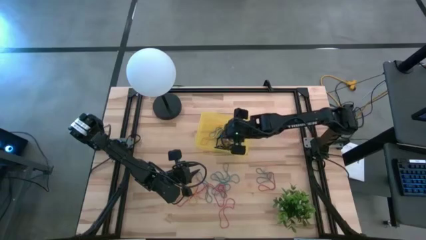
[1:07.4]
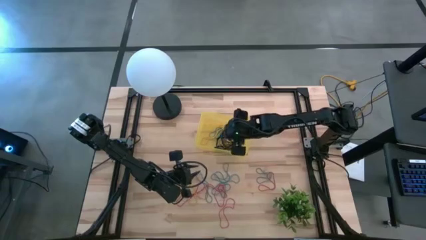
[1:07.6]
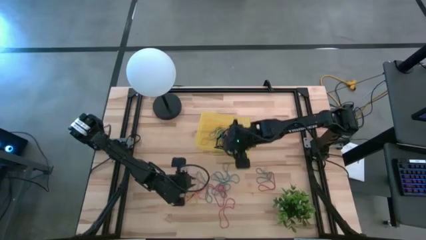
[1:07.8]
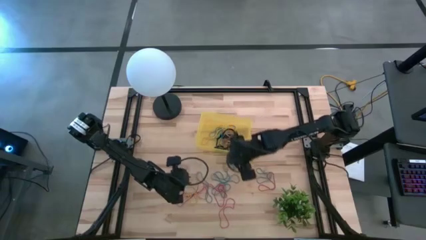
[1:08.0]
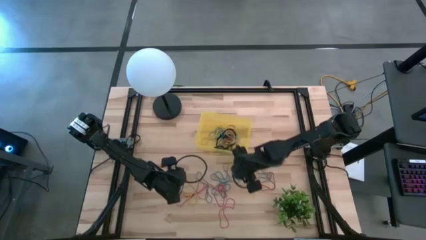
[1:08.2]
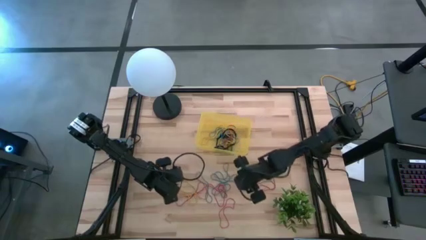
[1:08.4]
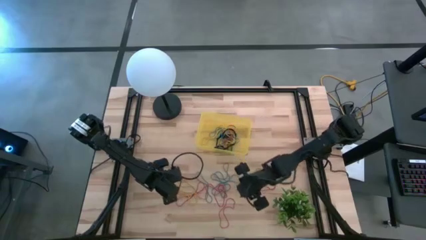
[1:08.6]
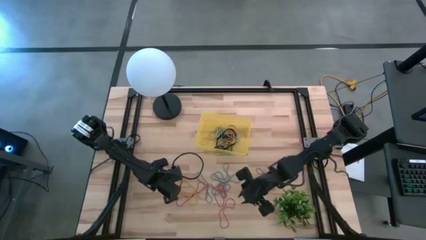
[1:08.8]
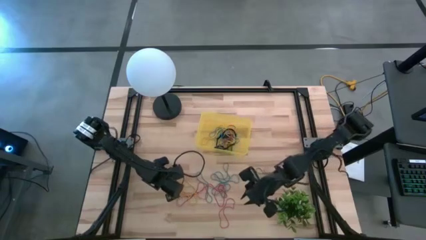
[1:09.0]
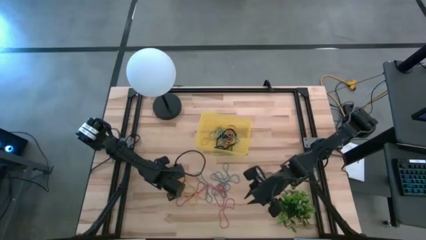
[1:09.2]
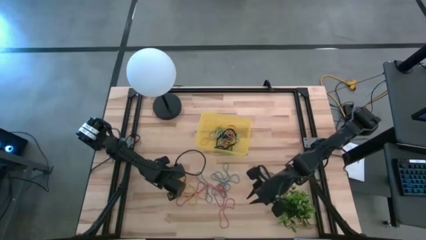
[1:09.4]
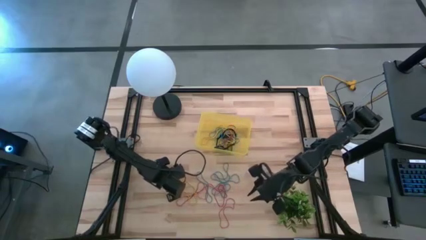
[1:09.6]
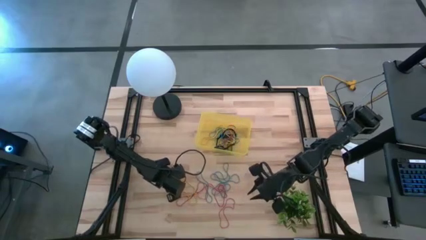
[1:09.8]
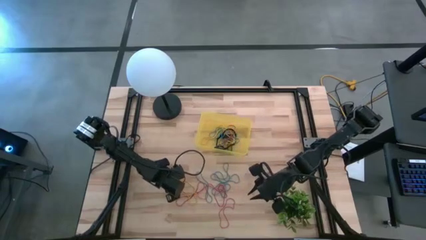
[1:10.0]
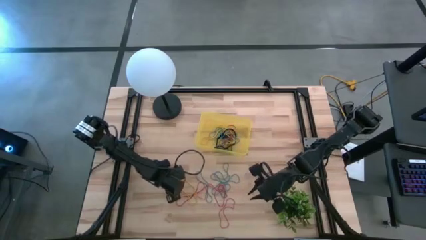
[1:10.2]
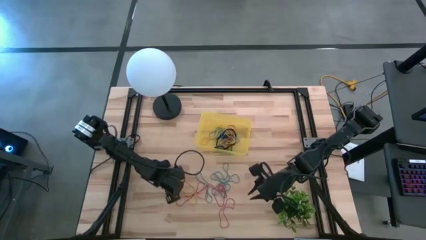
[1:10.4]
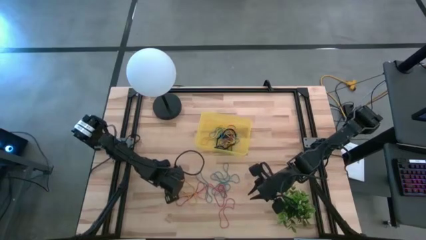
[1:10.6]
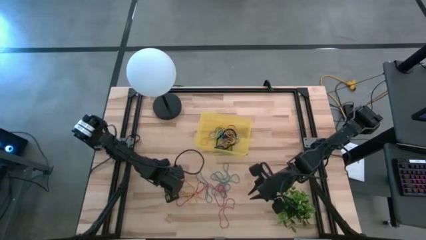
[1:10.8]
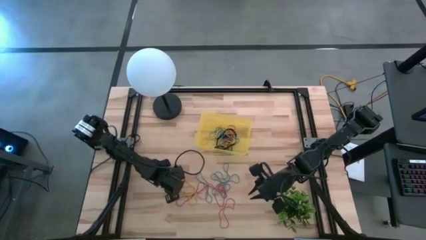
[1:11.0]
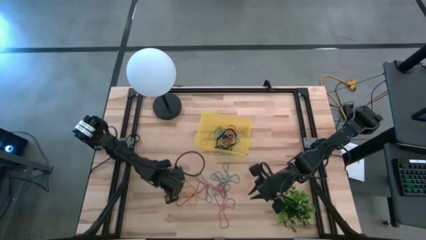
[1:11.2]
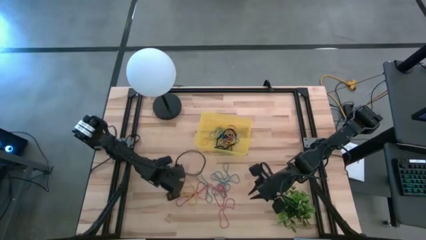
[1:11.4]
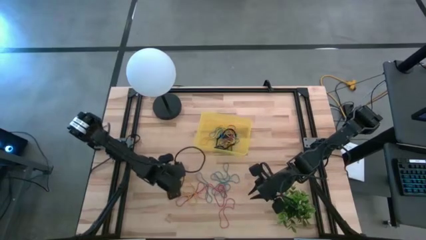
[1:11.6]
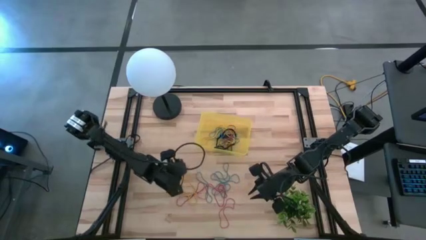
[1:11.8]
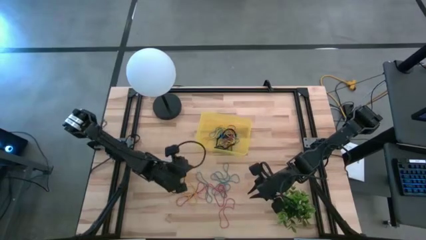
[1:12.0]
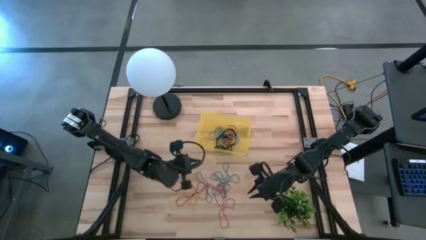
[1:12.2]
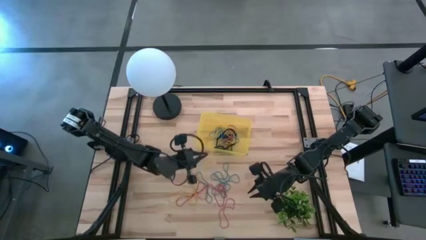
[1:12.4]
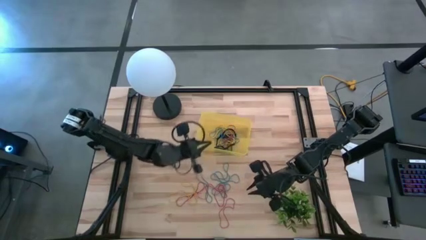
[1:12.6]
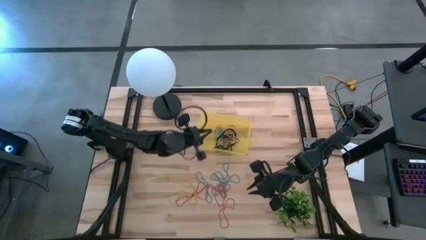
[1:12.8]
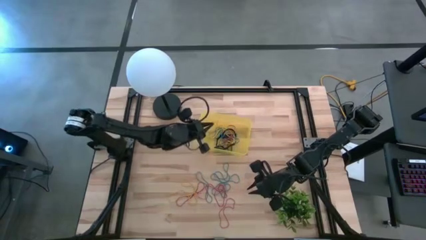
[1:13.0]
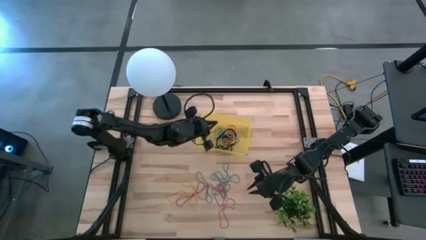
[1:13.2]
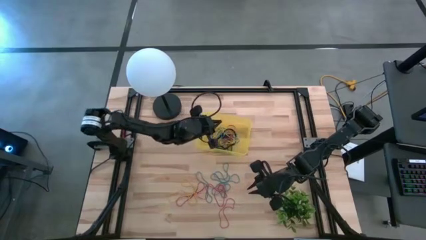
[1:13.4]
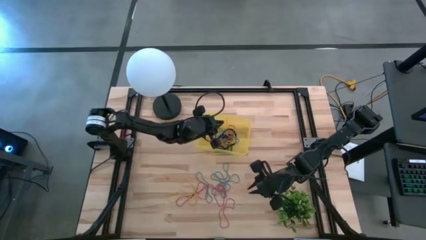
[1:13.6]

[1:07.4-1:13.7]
Task: Pick and place rubber bands into bin
Put the yellow rubber band into the yellow bin

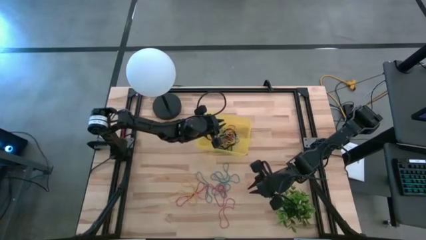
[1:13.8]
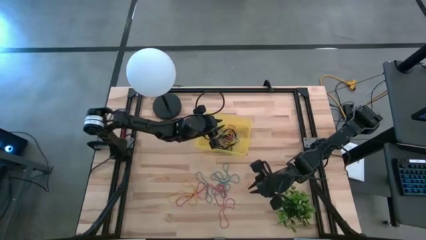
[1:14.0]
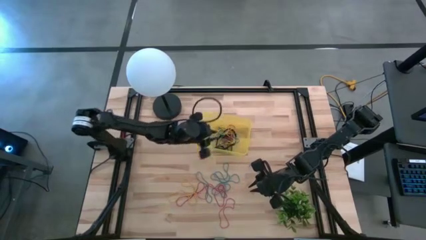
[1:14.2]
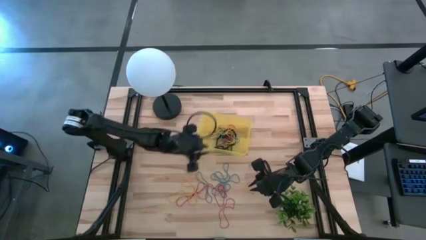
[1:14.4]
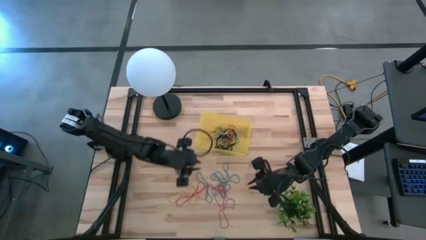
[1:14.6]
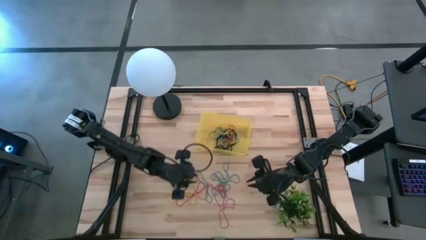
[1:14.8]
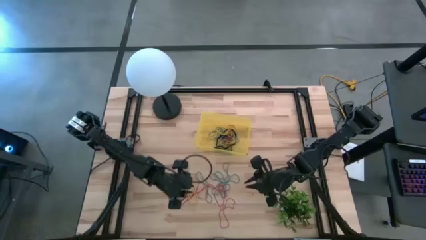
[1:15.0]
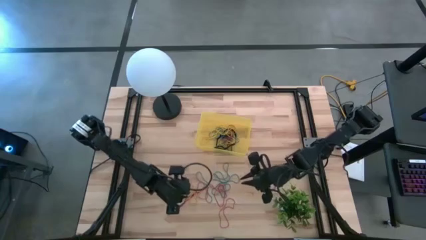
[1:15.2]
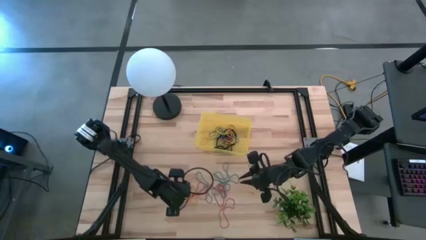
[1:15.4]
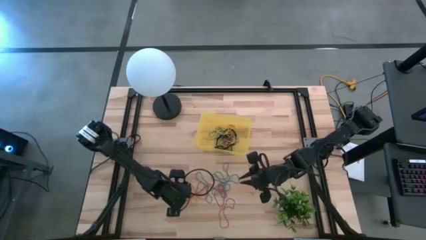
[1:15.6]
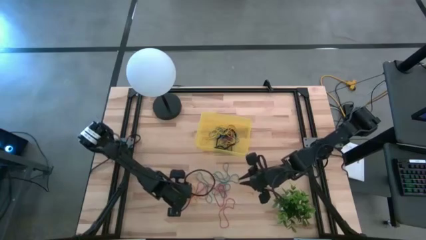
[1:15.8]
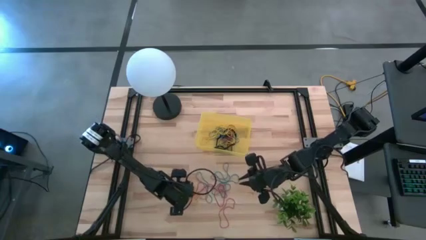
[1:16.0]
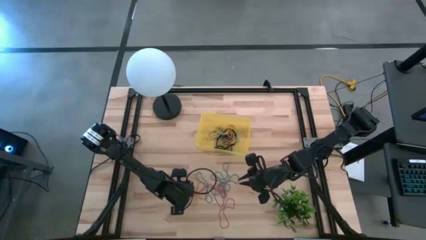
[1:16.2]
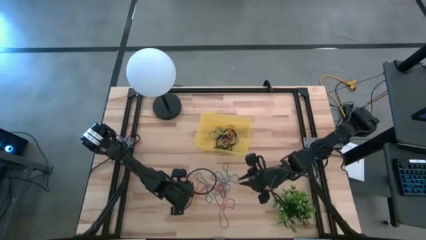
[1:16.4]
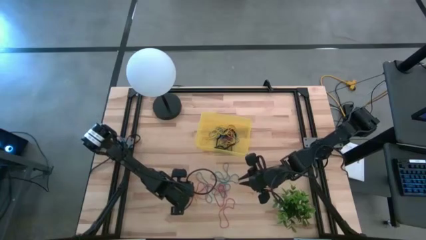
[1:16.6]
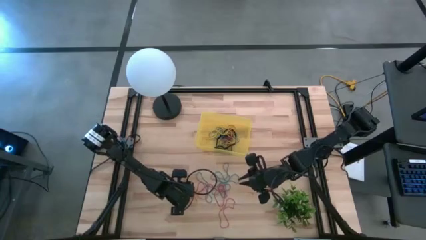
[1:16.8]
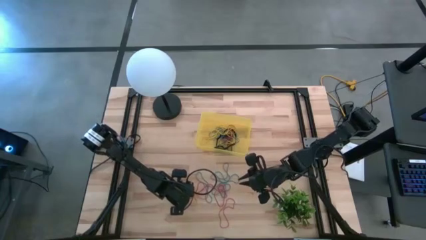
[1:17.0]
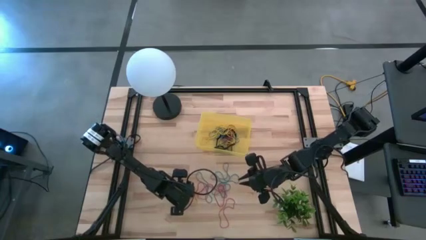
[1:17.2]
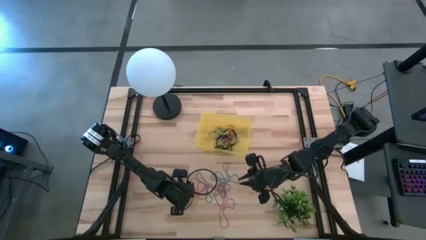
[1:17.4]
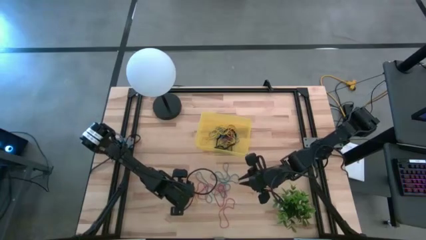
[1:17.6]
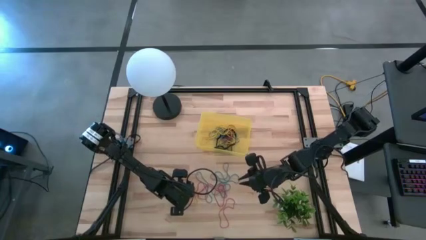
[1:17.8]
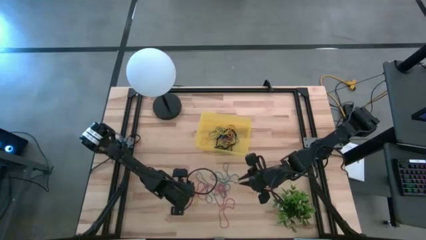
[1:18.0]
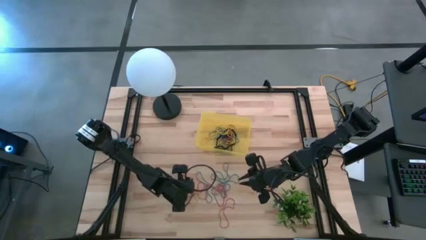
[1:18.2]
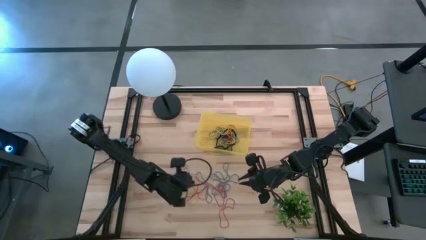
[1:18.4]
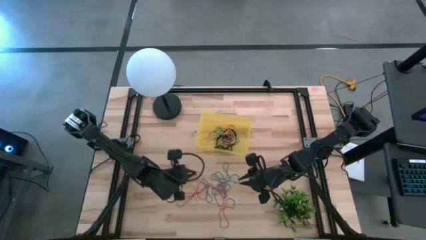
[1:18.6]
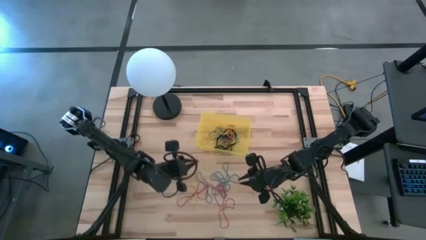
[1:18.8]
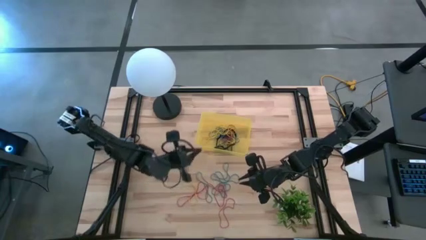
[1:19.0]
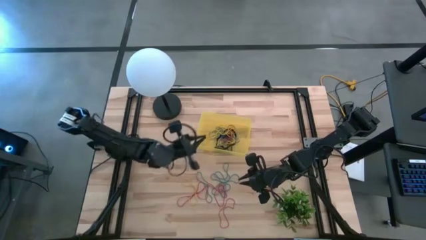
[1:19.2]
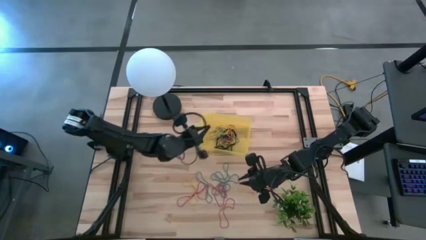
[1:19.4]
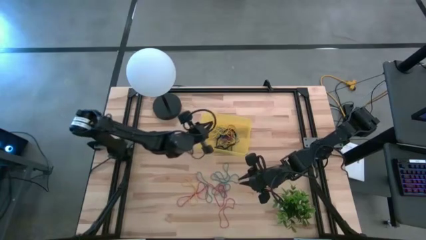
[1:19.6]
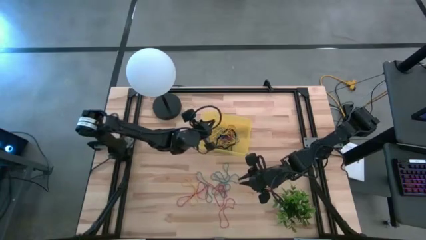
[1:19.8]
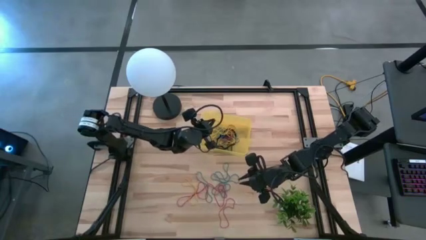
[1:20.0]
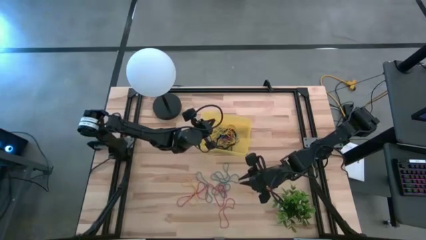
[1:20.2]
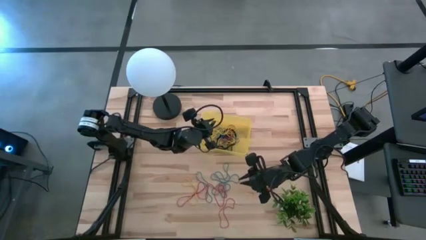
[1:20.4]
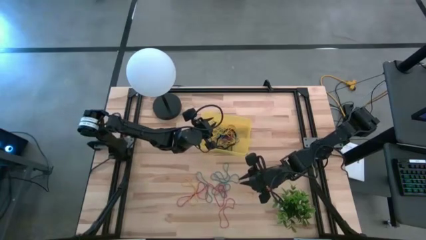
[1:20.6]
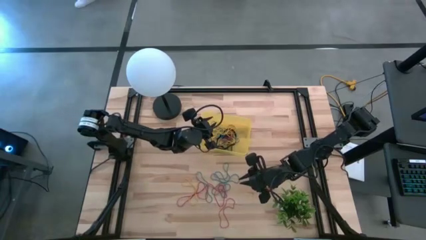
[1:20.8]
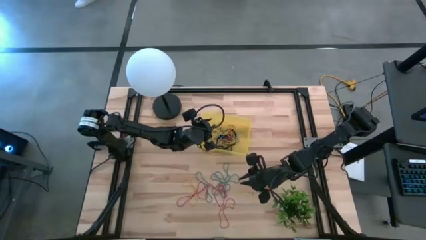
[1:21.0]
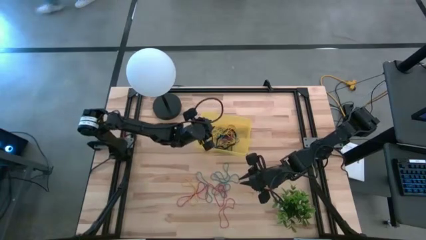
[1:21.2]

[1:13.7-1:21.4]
Put the yellow rubber band into the yellow bin

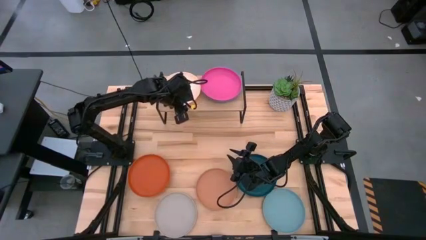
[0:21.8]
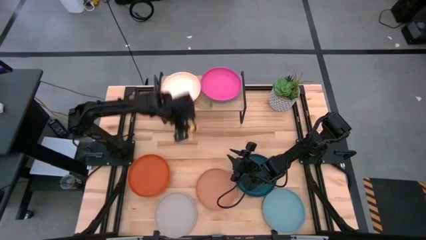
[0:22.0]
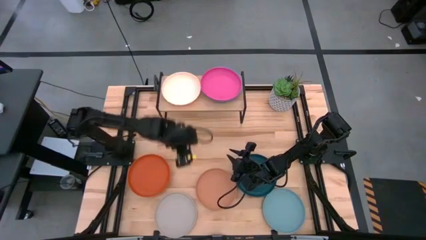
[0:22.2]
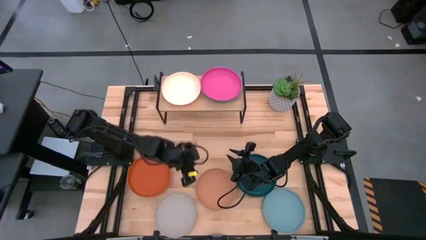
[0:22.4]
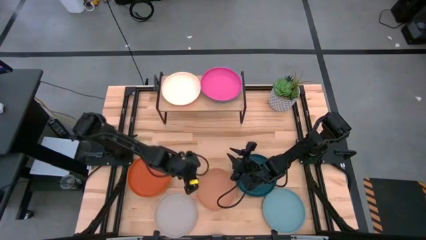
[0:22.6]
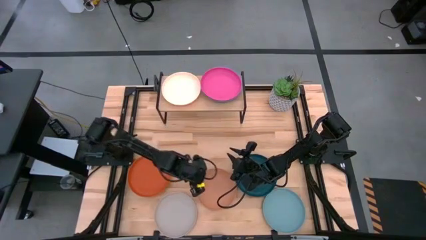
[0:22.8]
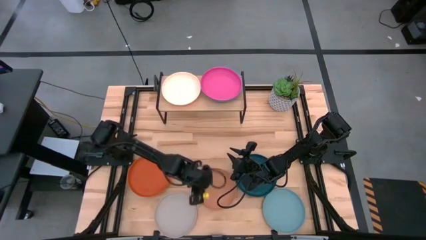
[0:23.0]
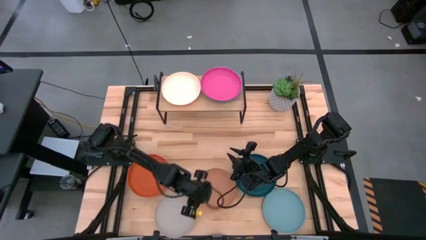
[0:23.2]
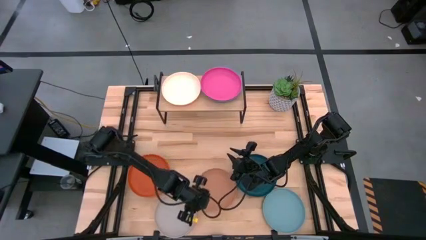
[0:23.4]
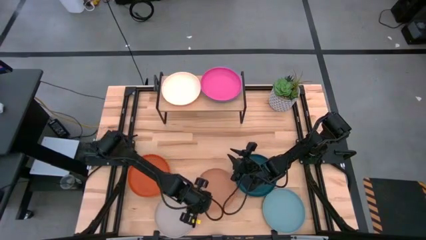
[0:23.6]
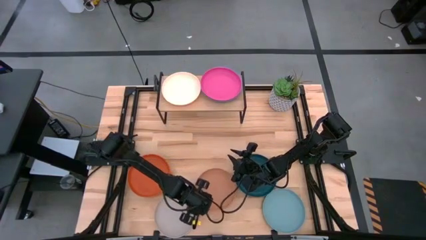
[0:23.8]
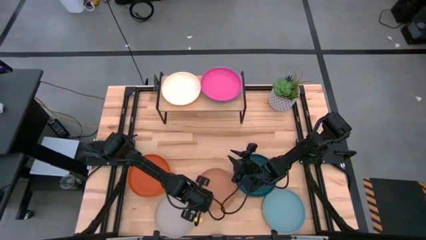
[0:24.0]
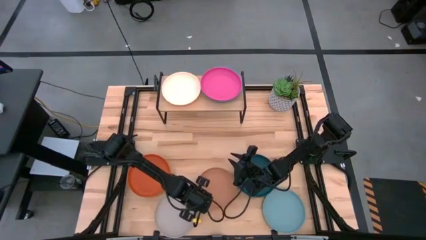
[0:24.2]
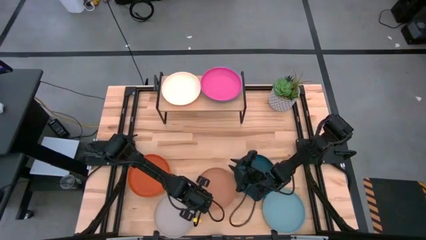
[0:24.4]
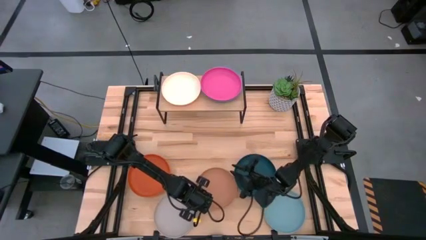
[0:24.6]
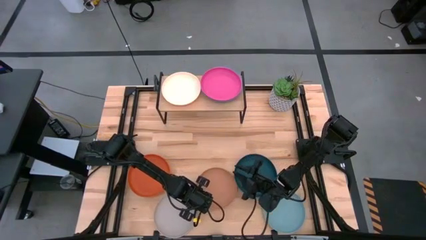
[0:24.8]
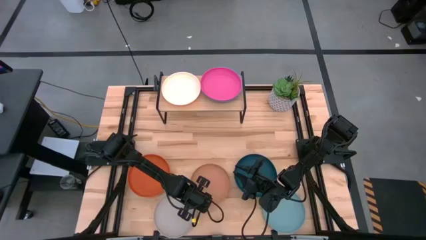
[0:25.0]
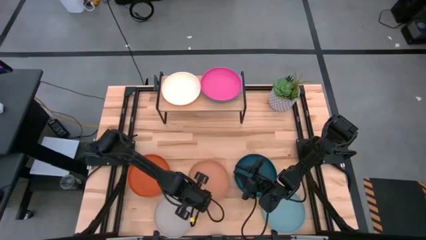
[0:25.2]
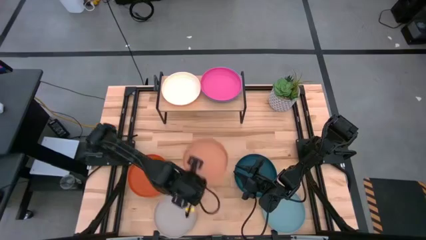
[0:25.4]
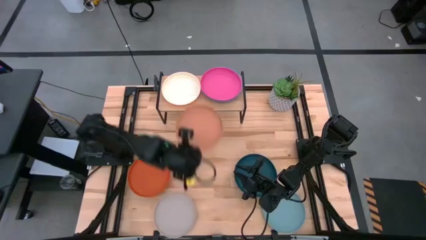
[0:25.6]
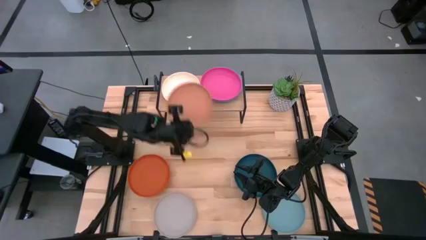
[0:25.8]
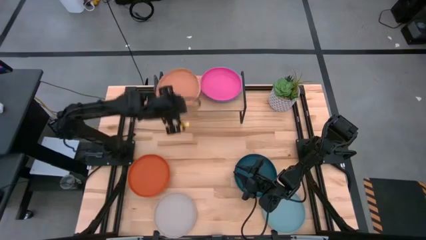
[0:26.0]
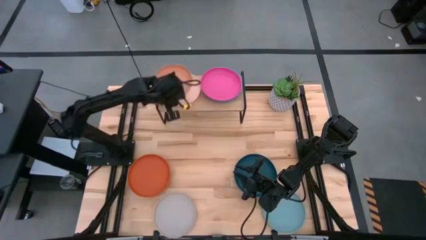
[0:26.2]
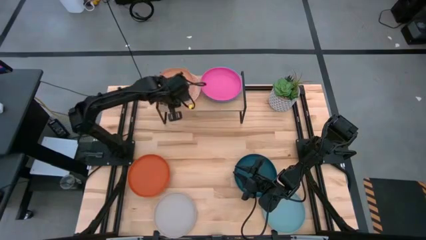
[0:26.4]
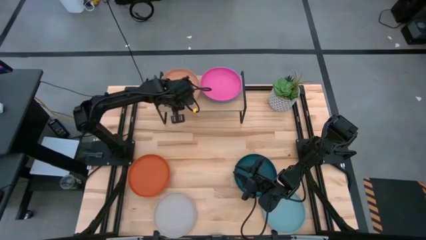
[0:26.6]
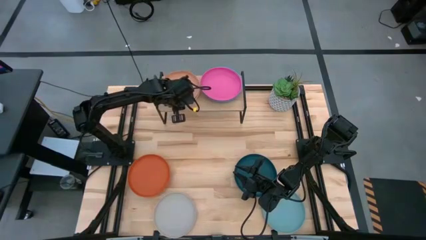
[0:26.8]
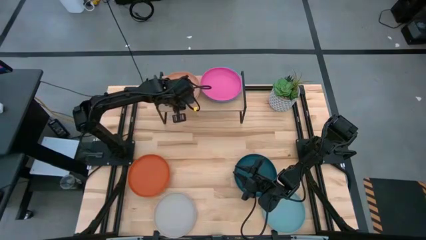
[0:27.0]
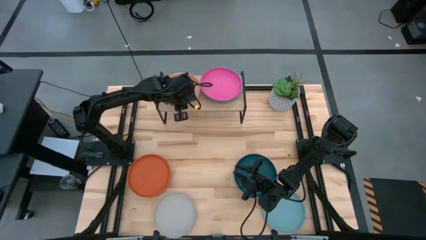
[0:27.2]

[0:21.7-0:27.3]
Task: Place and stack plates onto a shelf
Stack the brown plate on top of the white plate on the shelf
